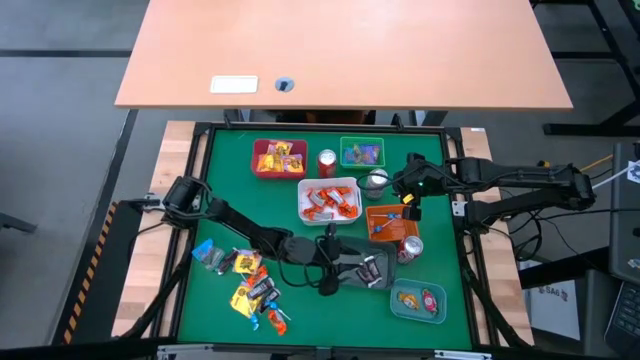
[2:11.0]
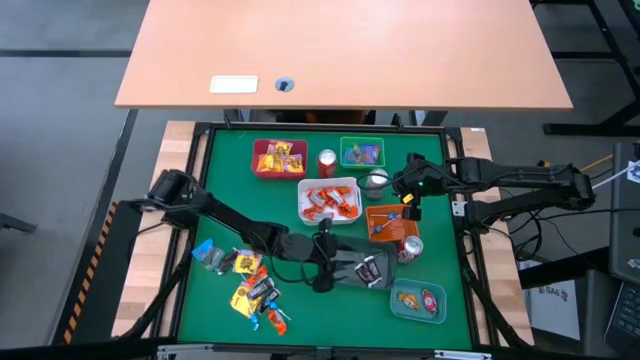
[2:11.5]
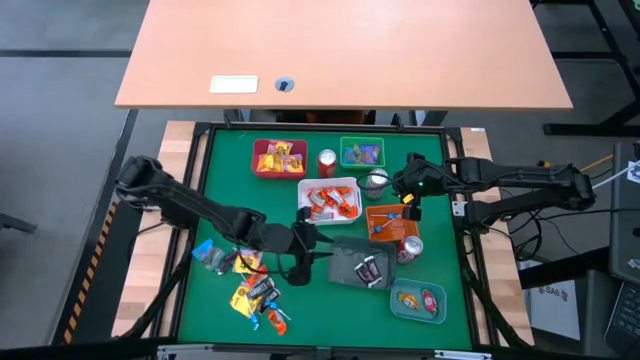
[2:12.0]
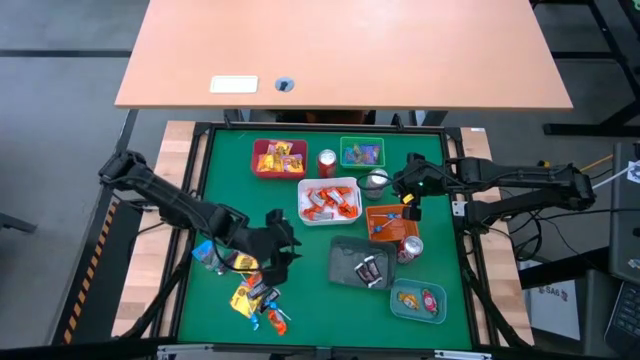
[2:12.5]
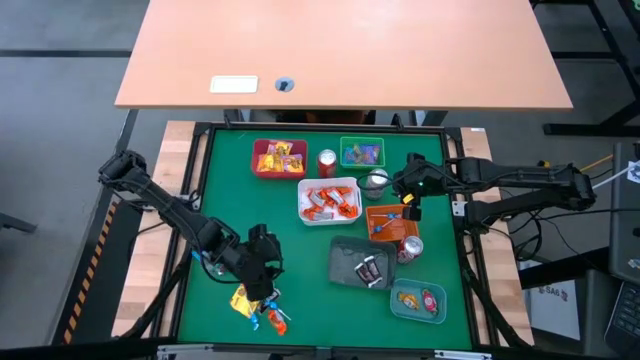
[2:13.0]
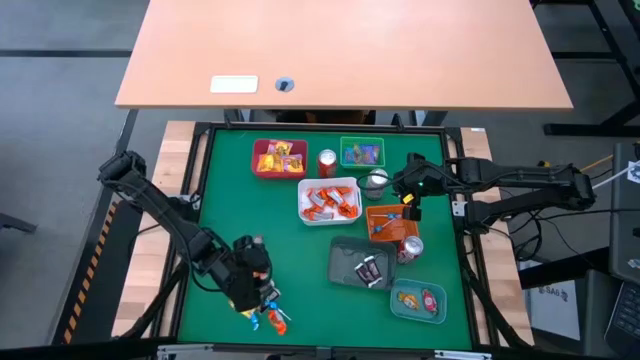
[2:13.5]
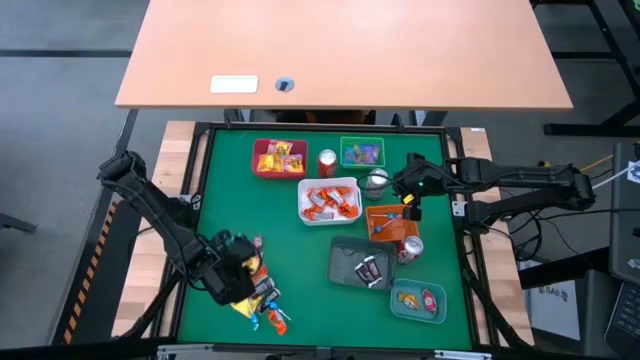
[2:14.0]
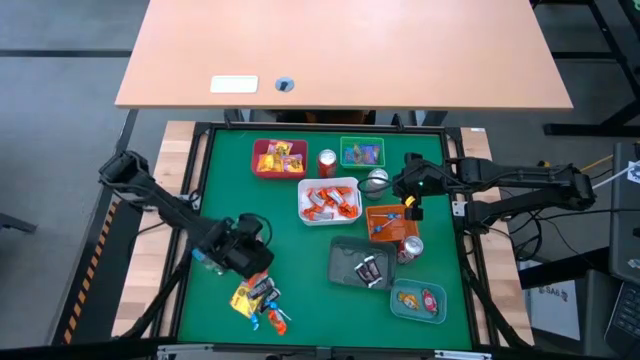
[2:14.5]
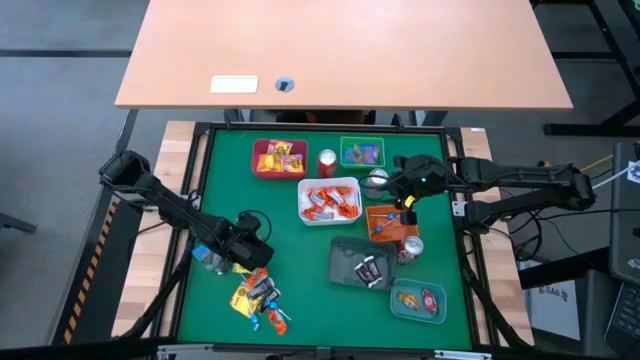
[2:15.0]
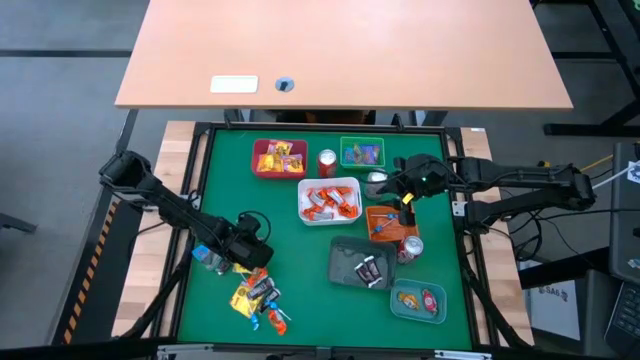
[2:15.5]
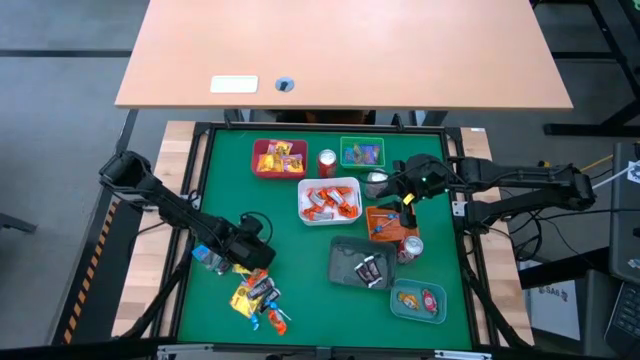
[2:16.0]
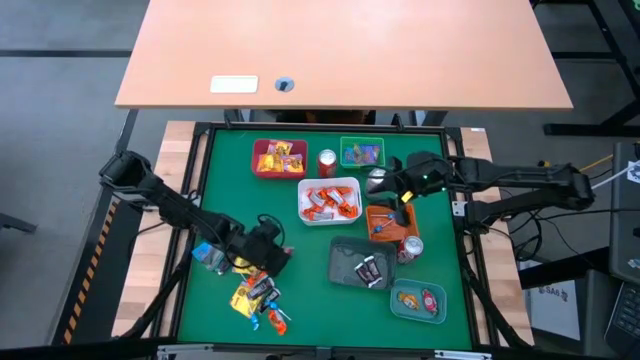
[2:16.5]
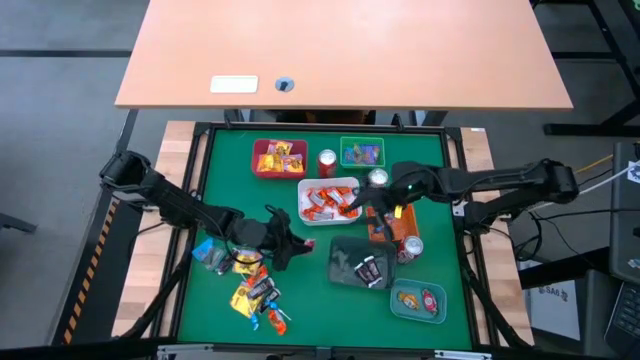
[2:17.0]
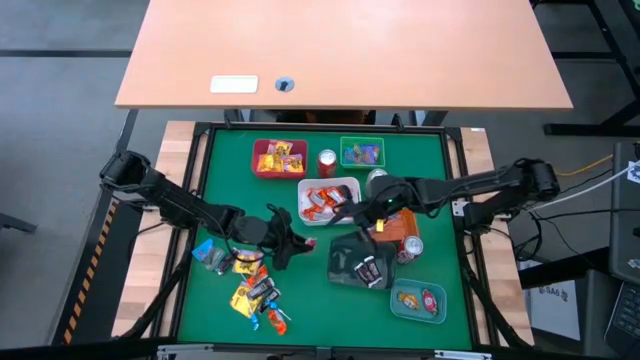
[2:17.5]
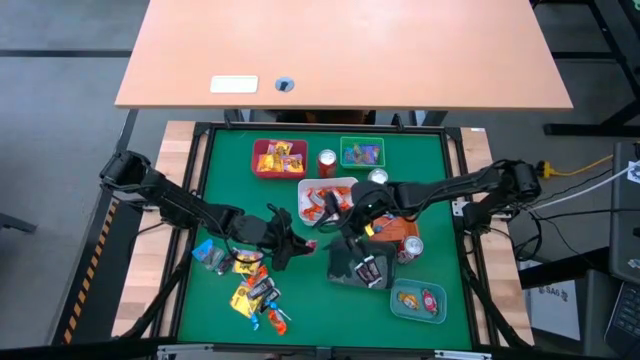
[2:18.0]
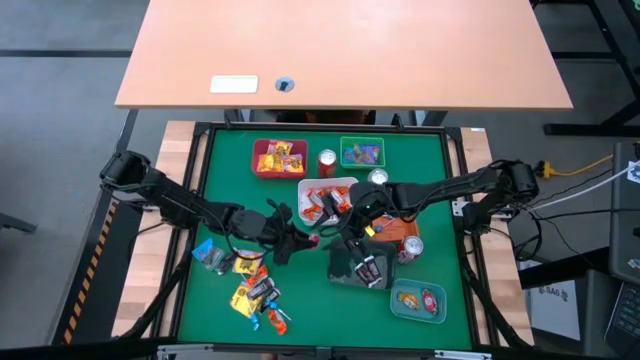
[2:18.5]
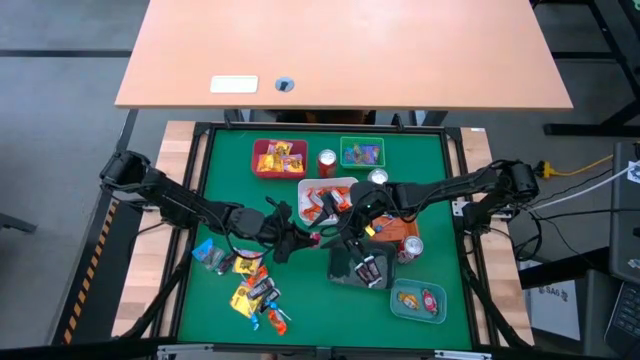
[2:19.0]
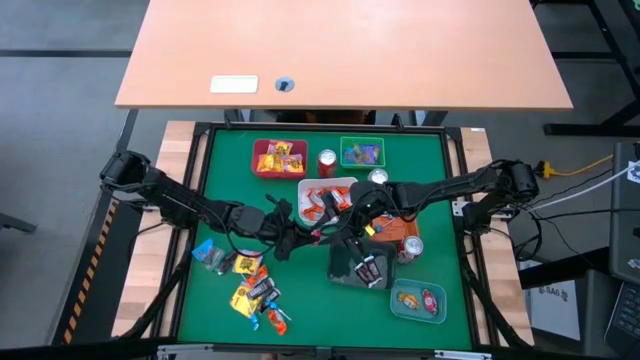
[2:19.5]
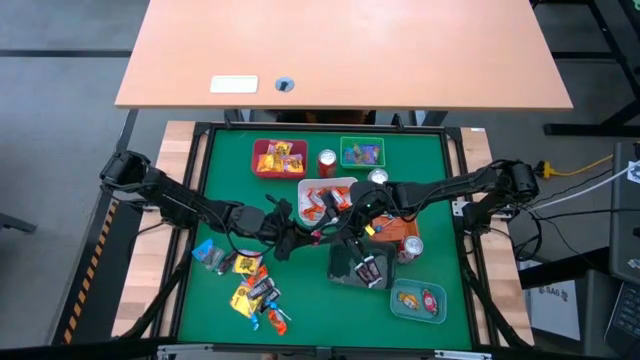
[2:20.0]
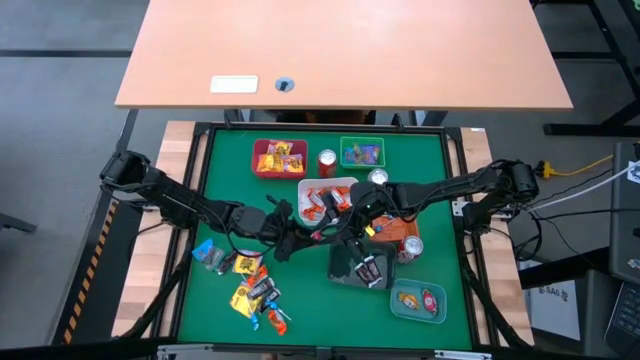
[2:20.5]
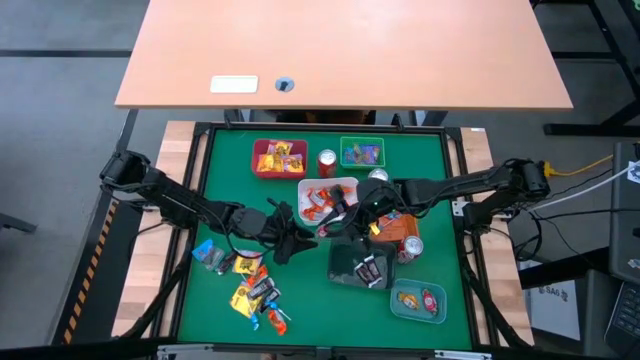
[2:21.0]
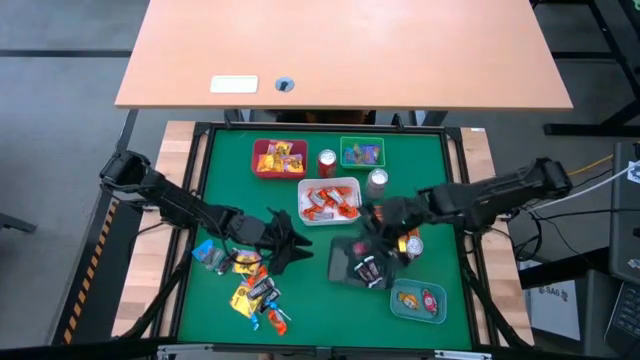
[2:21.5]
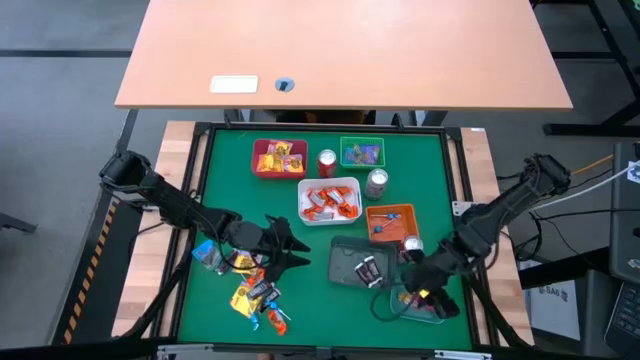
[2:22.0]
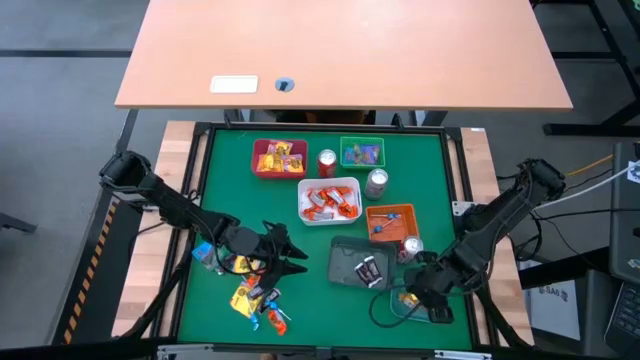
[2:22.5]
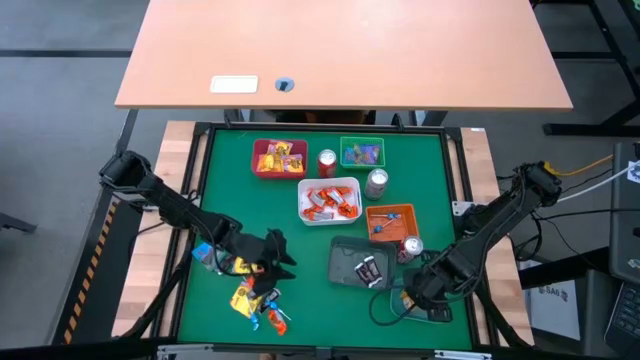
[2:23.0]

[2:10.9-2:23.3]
Task: Sort candy
Put the red candy into the dark green bin

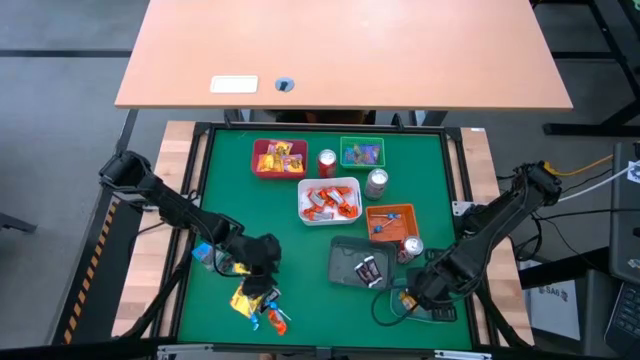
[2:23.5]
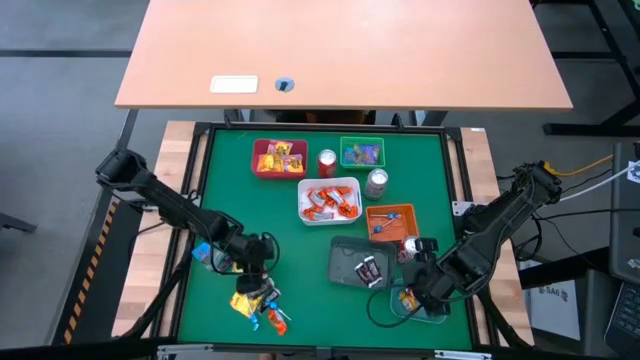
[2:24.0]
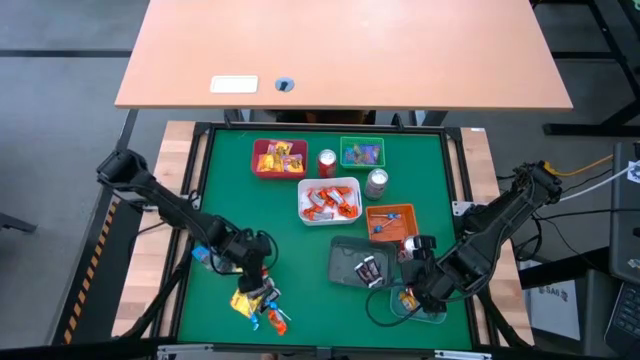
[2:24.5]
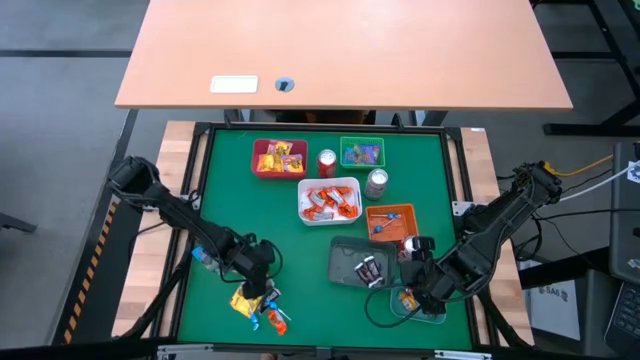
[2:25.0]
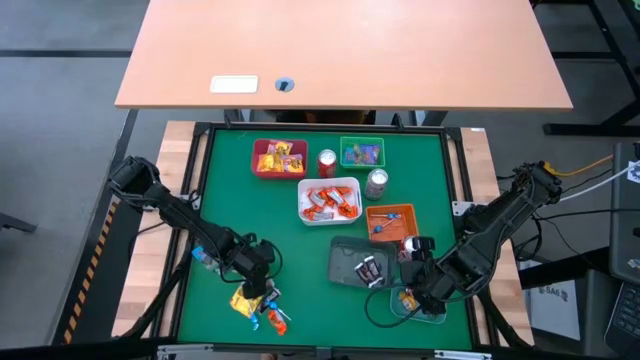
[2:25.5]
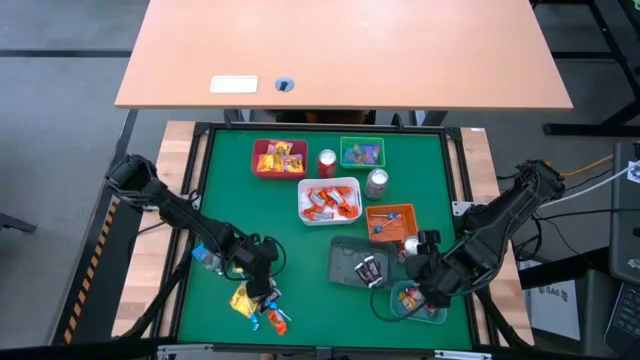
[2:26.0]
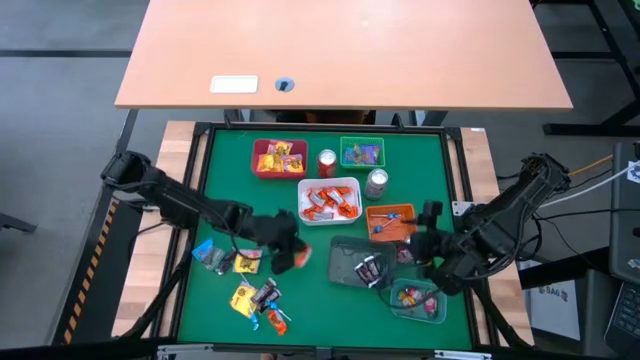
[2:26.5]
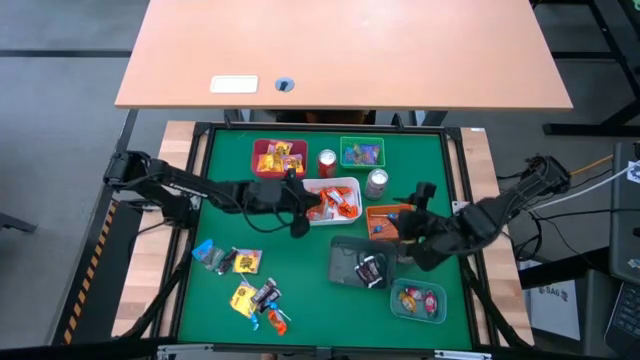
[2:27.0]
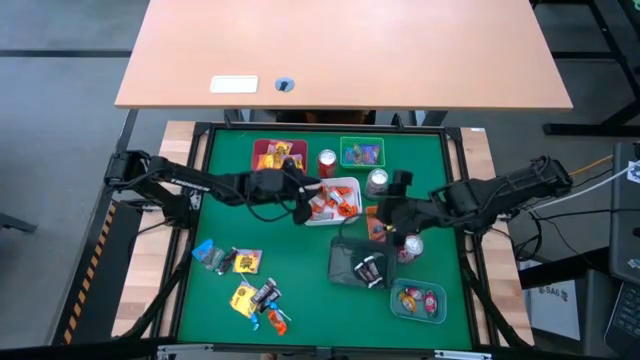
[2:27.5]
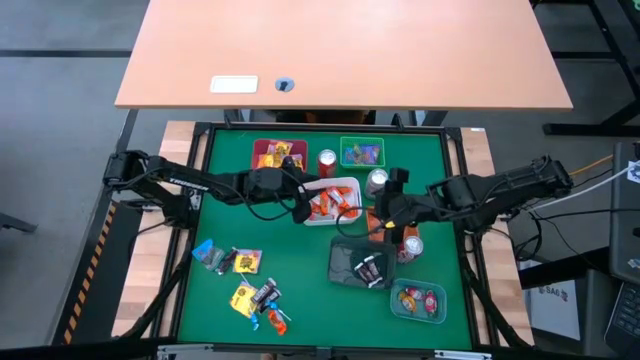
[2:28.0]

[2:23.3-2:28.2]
Put the orange candy into the white bin

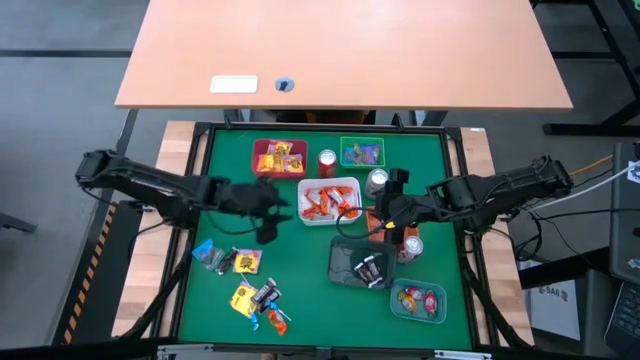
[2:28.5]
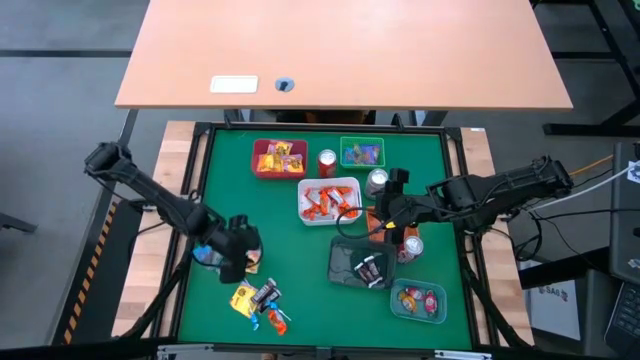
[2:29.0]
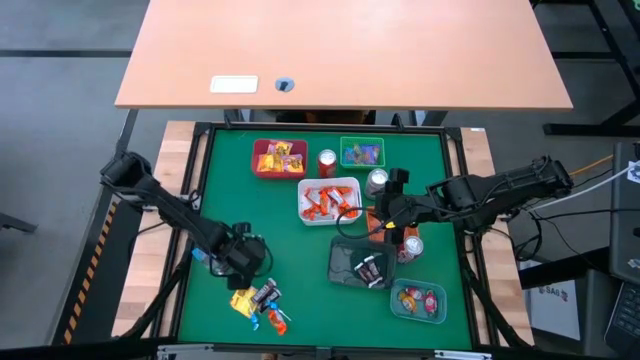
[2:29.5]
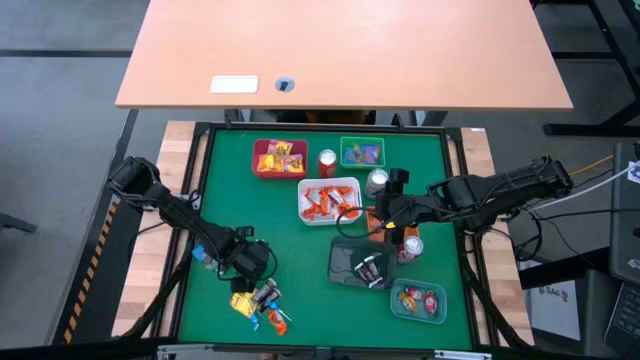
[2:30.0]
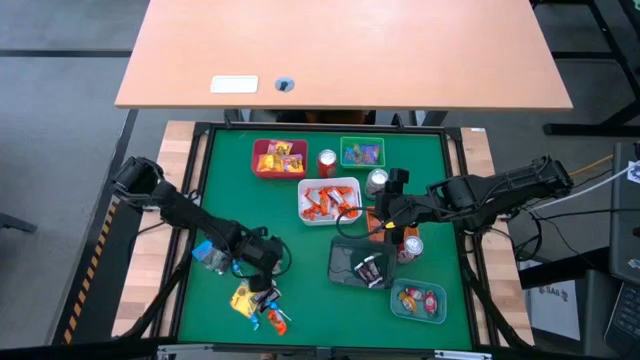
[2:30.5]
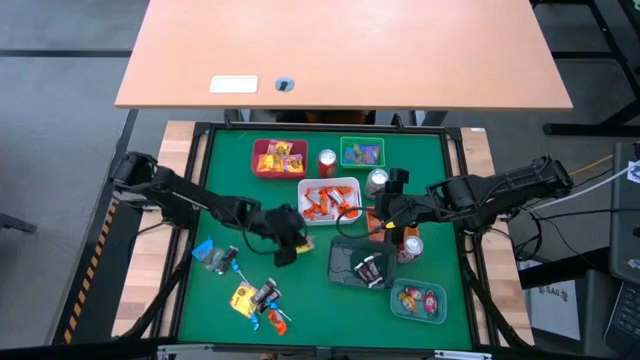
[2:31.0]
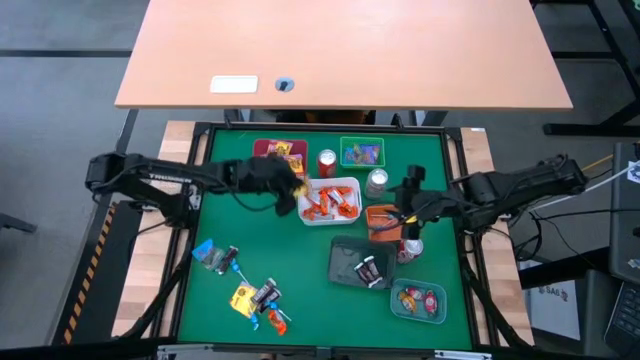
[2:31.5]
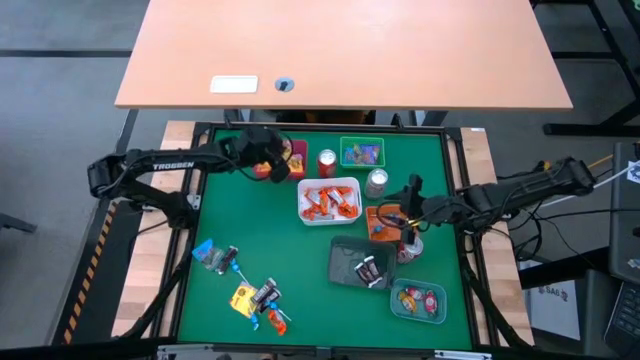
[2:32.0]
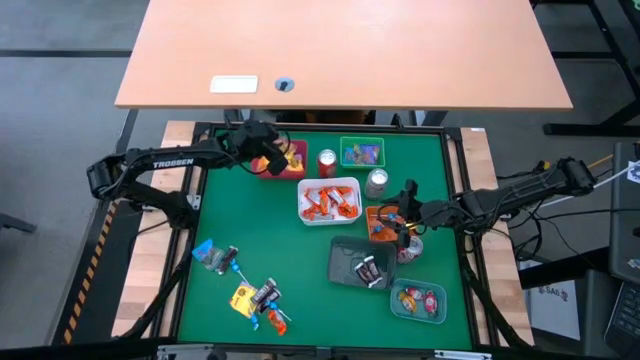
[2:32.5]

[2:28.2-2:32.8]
Put the yellow candy into the red bin
